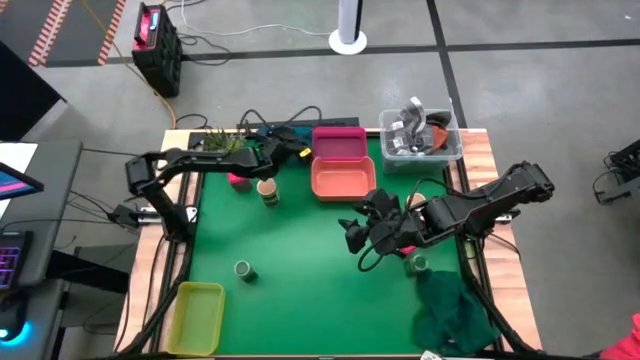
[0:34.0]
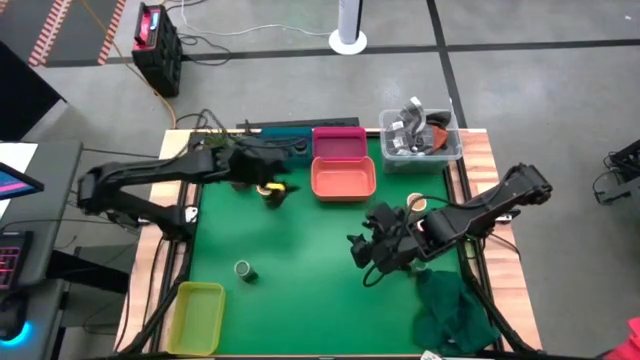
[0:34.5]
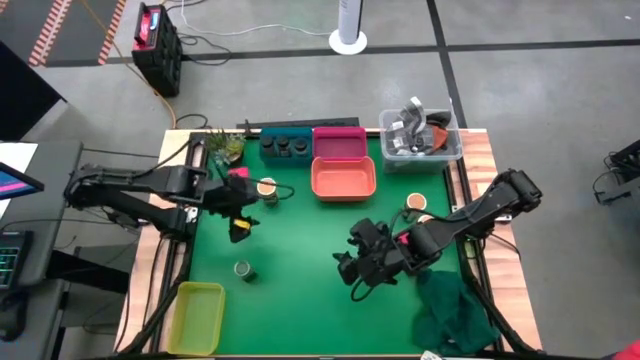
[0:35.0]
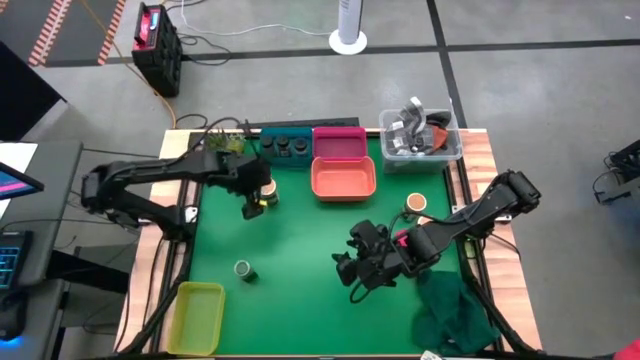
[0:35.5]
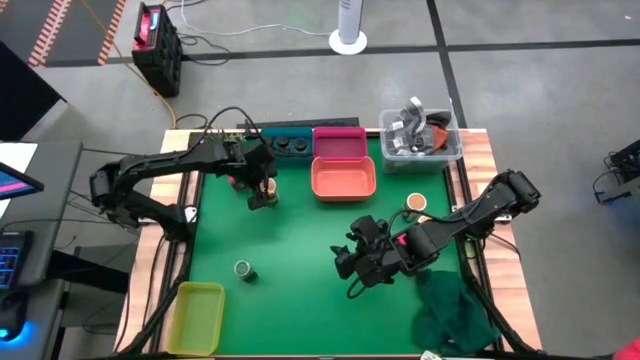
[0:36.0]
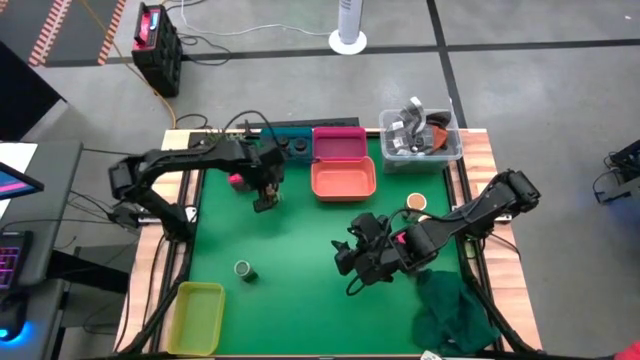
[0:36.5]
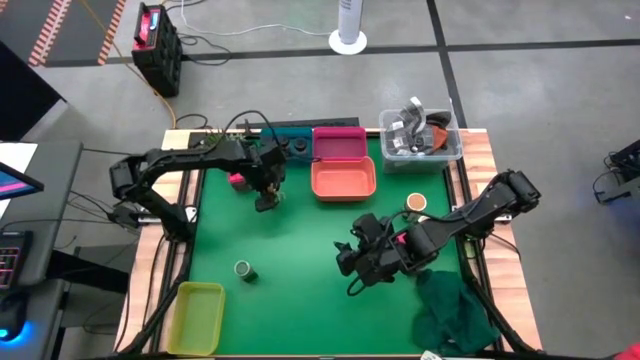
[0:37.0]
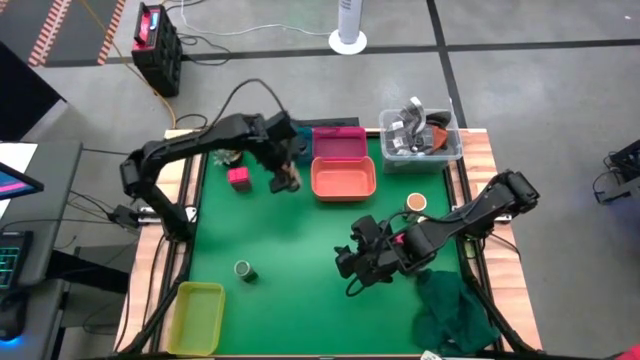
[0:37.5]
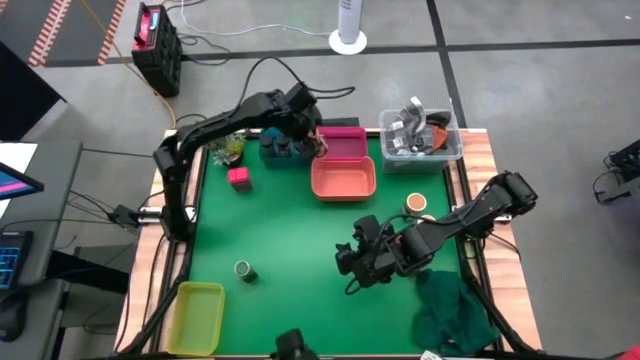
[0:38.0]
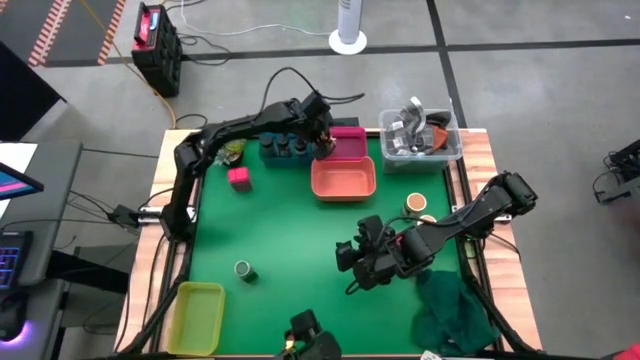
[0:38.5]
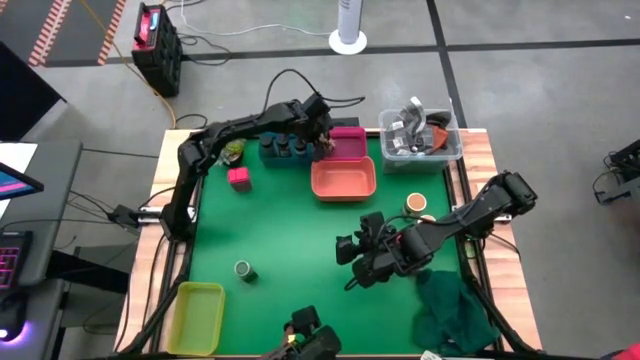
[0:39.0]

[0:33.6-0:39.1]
Task: Sort spices by type
Put the top left gold seasoning bottle into the pink bin

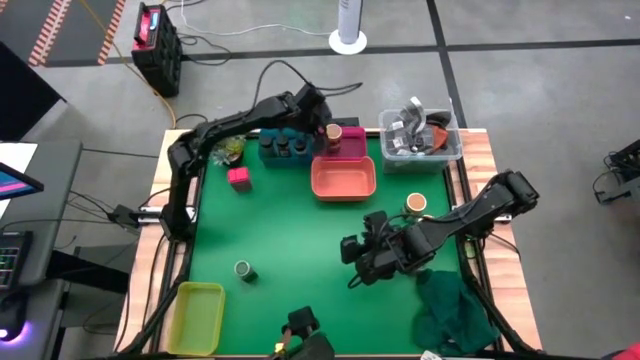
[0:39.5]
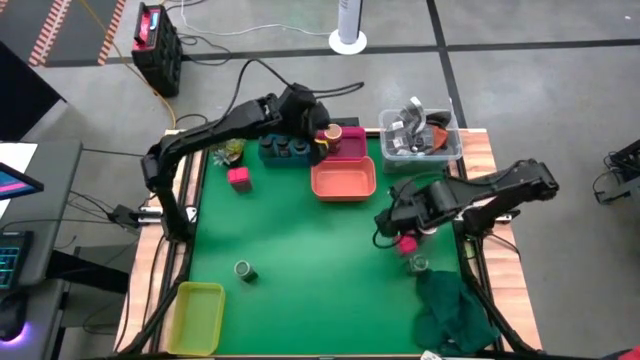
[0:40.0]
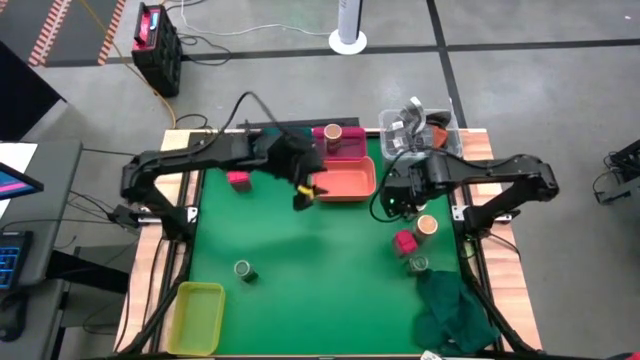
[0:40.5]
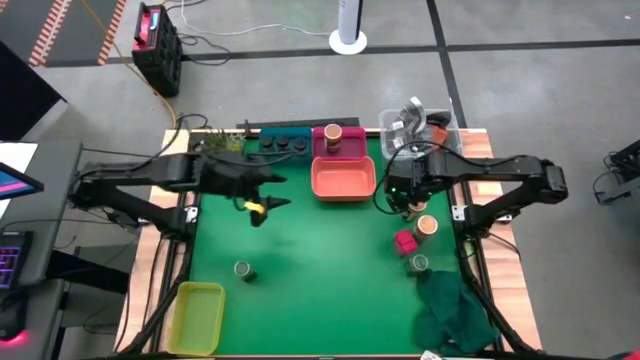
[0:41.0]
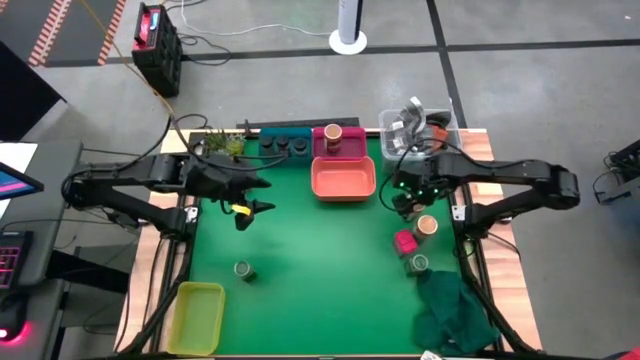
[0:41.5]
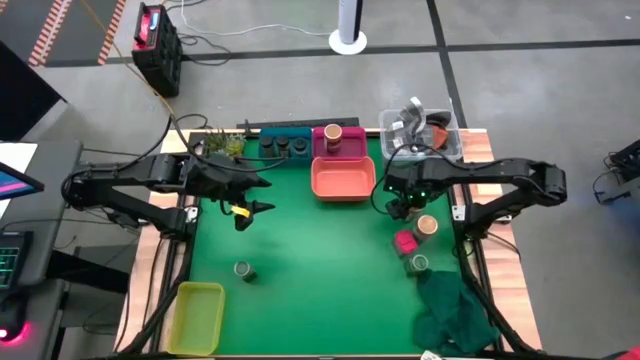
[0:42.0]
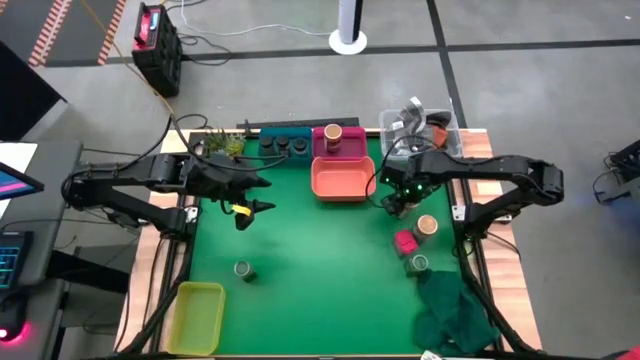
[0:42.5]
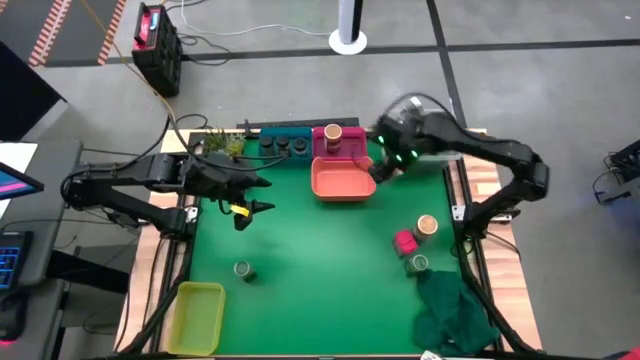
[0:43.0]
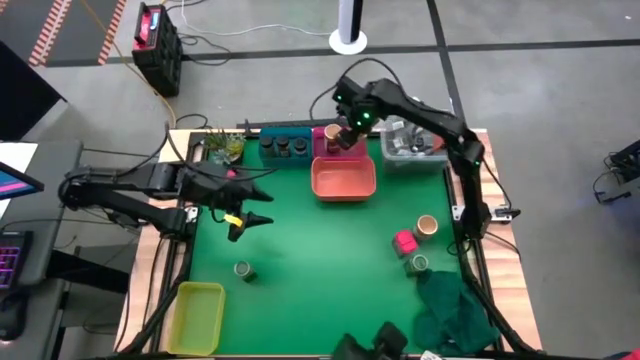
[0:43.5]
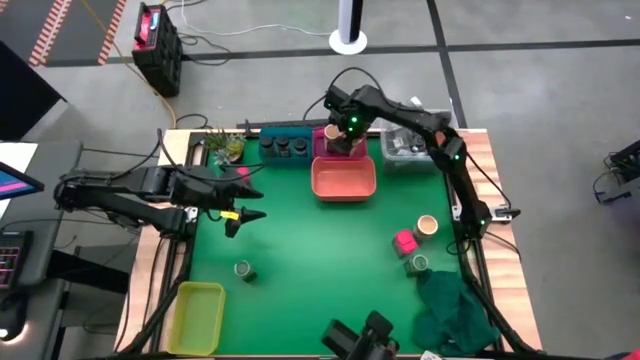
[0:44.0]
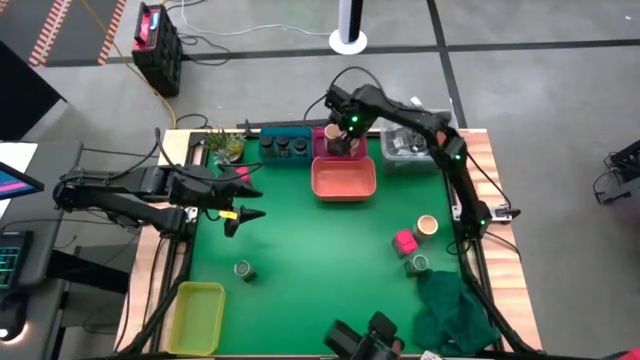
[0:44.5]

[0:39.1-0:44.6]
Put the top gold seasoning bottle into the pink bin

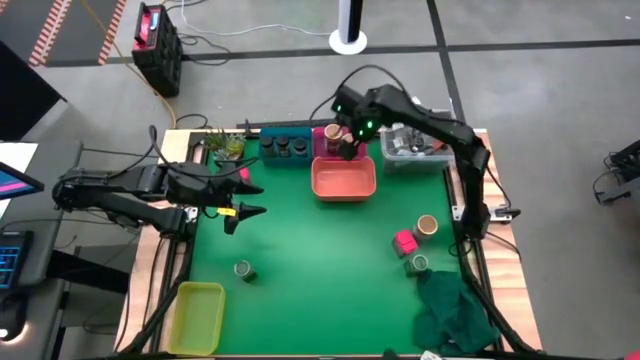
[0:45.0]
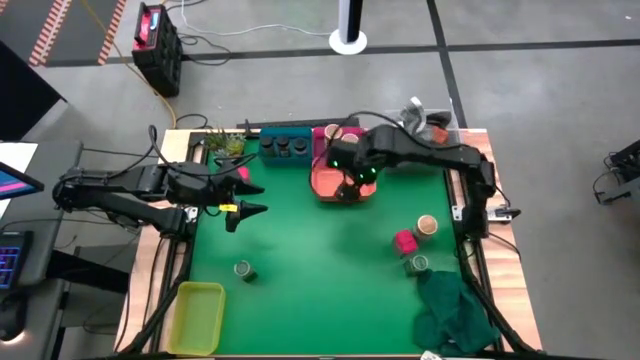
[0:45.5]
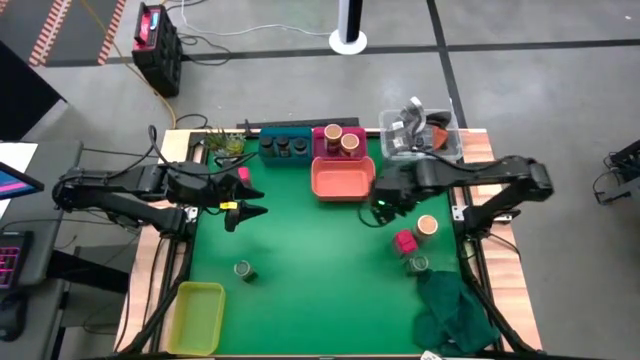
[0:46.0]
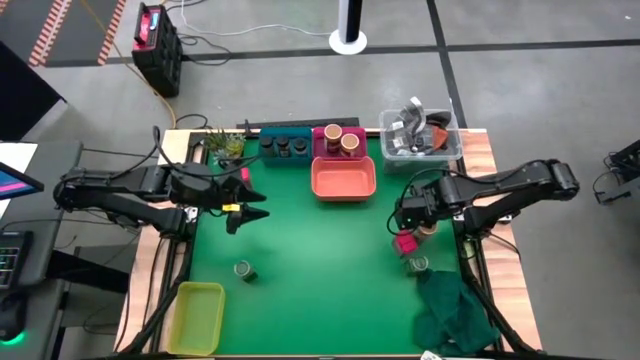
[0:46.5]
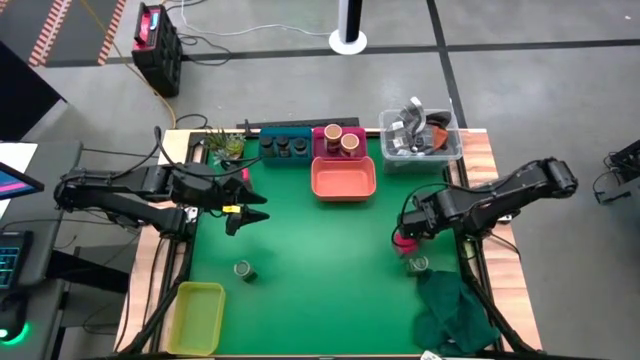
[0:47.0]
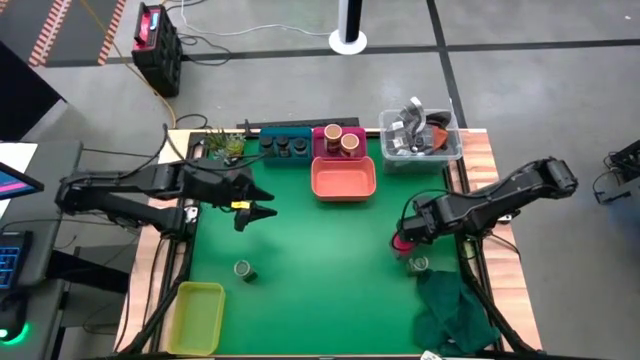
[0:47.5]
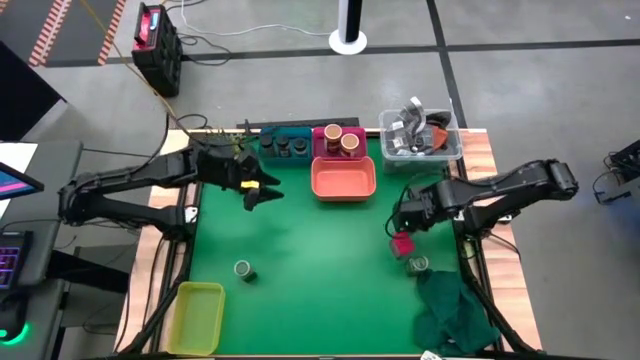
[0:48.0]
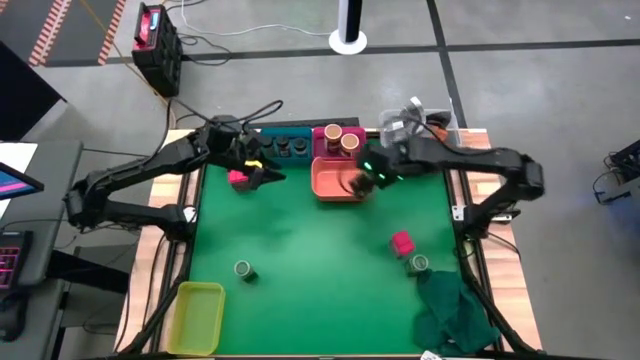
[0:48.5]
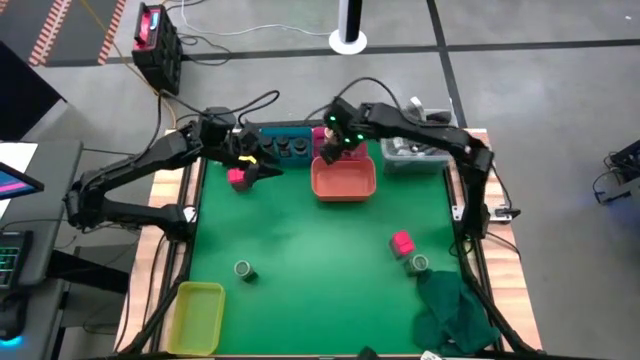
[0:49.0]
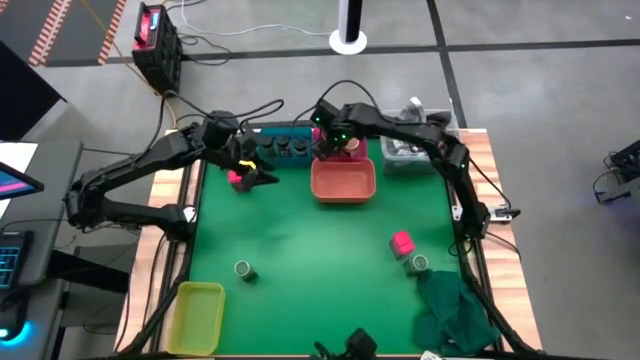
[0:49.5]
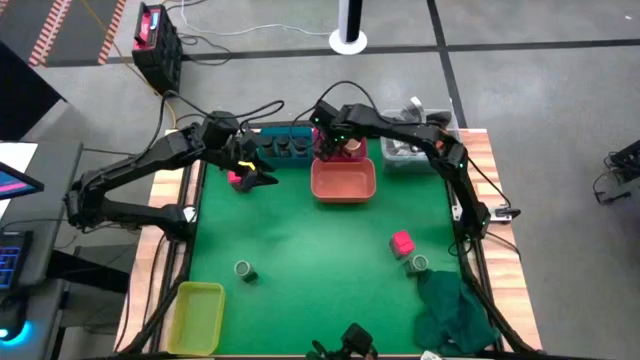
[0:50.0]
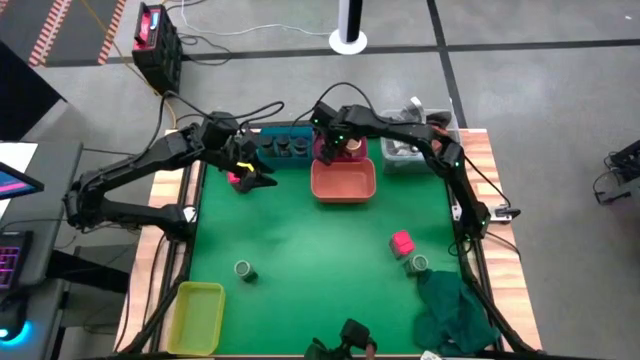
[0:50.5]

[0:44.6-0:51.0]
Put the gold seasoning bottle into the pink bin

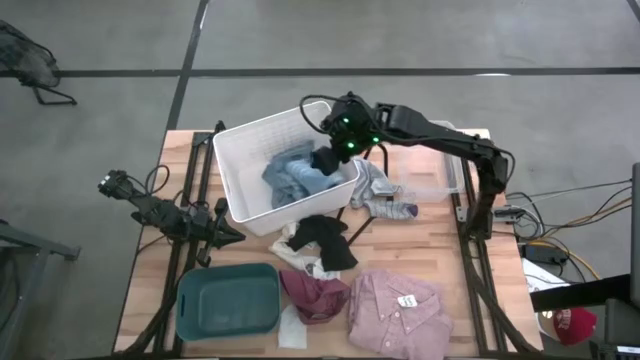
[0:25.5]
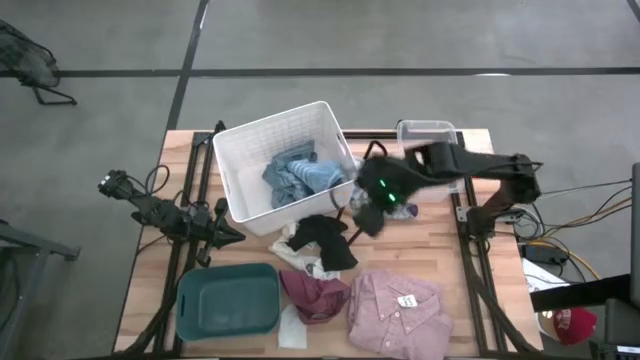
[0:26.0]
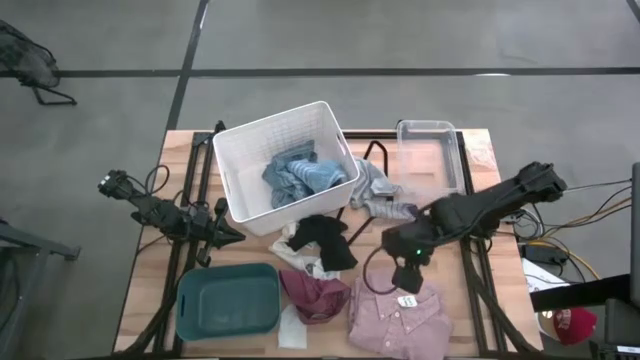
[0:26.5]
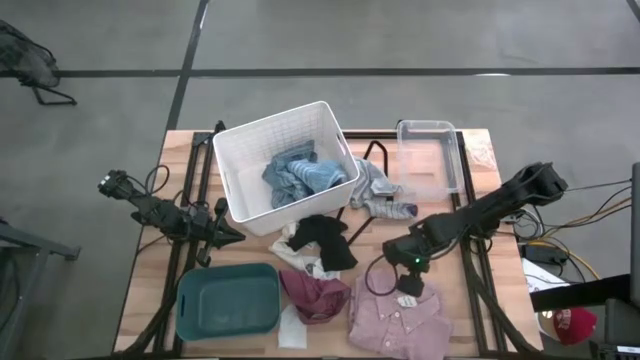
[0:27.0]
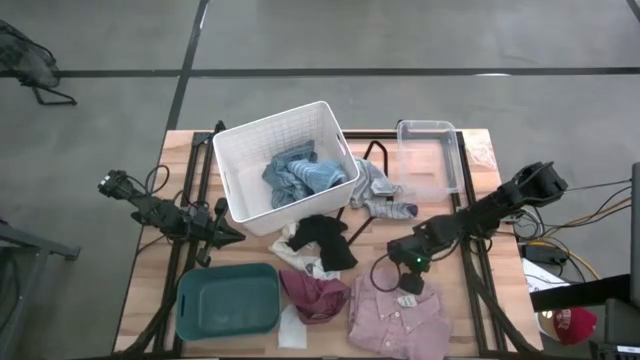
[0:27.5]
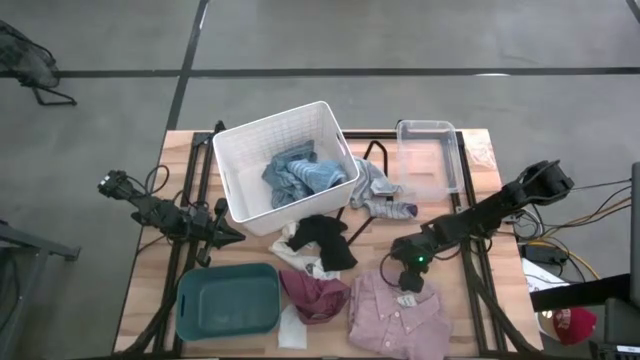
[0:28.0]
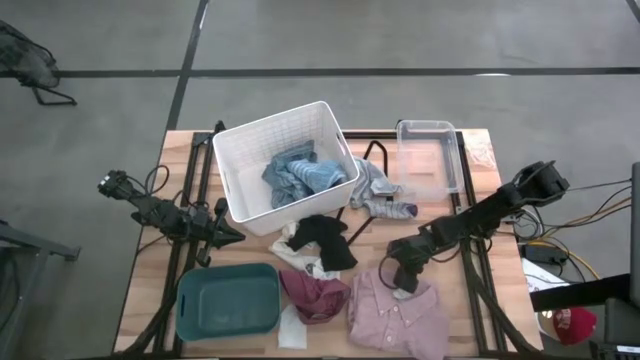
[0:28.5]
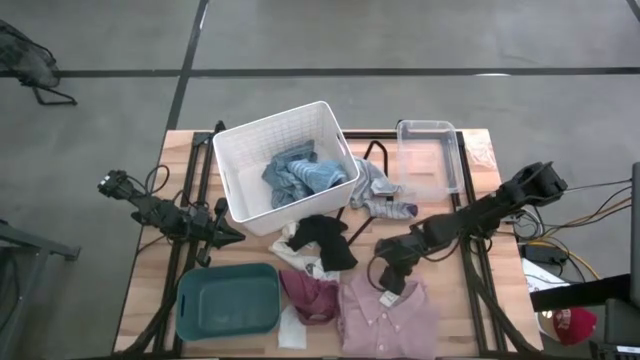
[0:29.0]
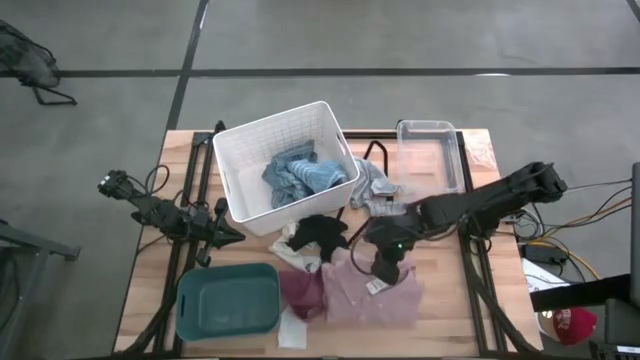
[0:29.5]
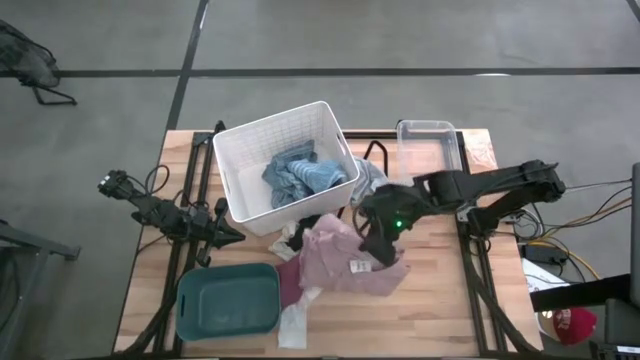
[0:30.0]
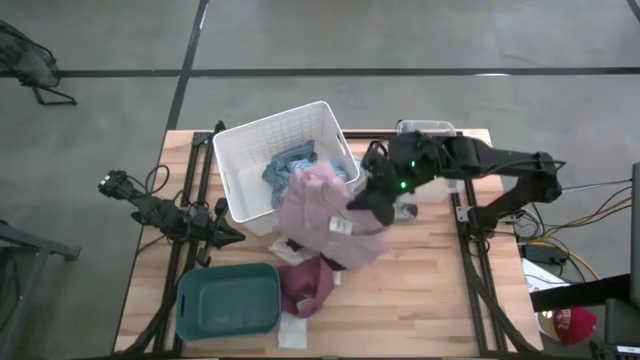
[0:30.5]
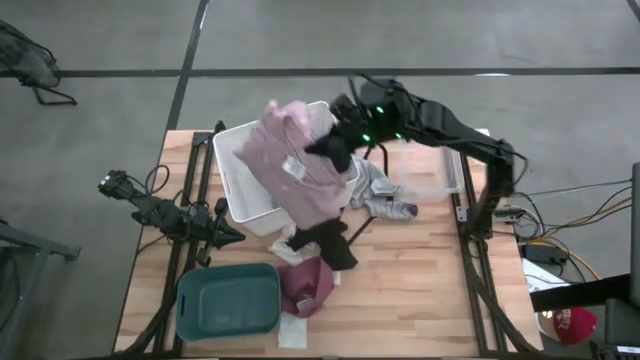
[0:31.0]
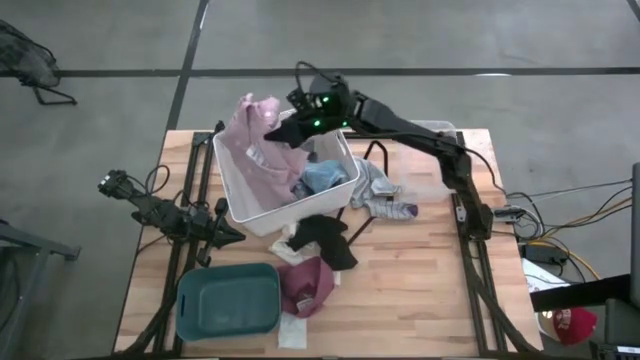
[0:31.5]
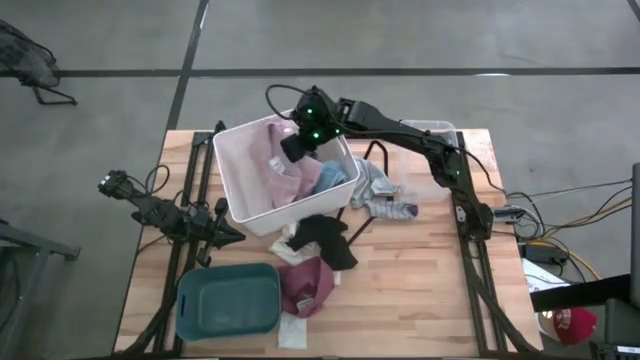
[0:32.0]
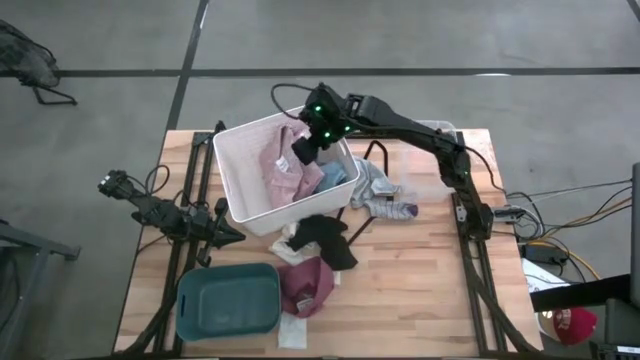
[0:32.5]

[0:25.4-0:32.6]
Task: Pick & Place Cloths
Put the pink polo shirt into the white bin
